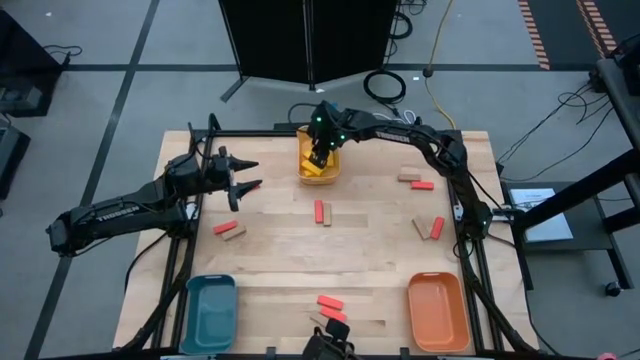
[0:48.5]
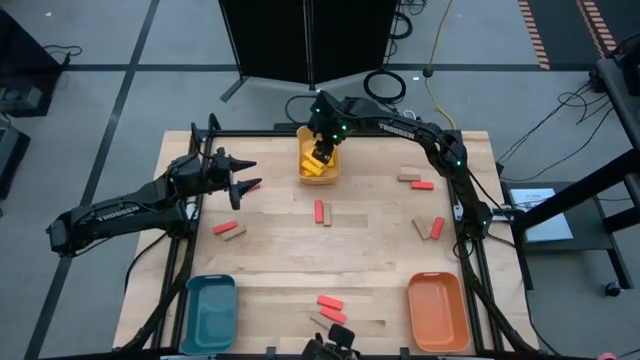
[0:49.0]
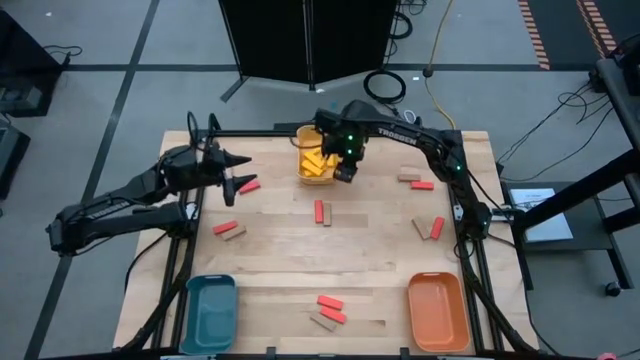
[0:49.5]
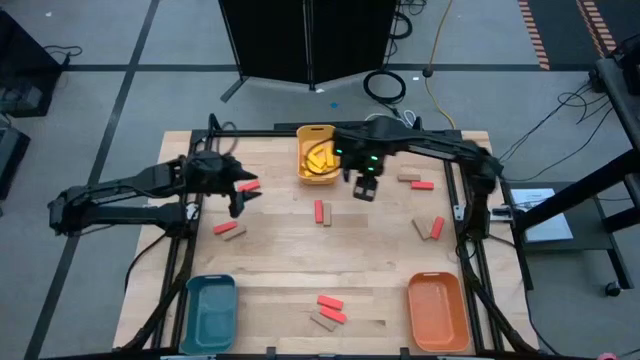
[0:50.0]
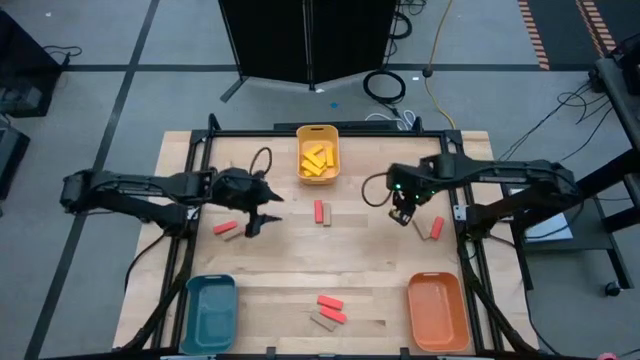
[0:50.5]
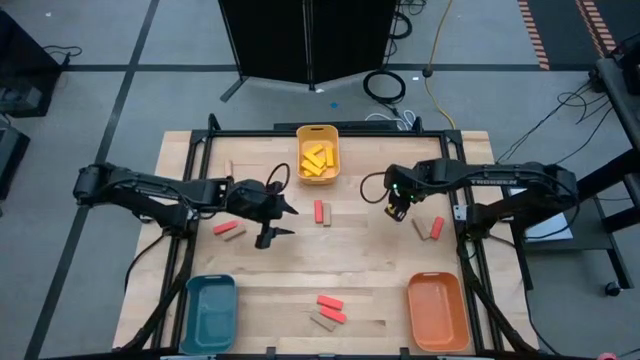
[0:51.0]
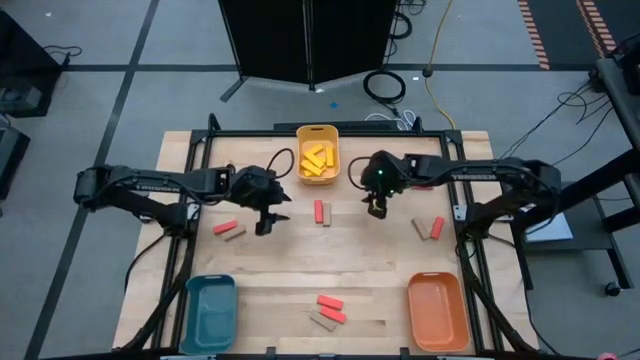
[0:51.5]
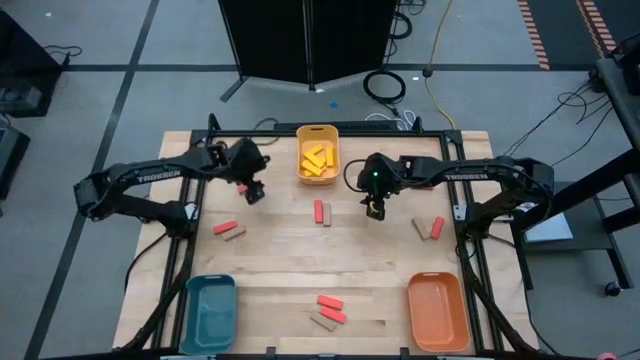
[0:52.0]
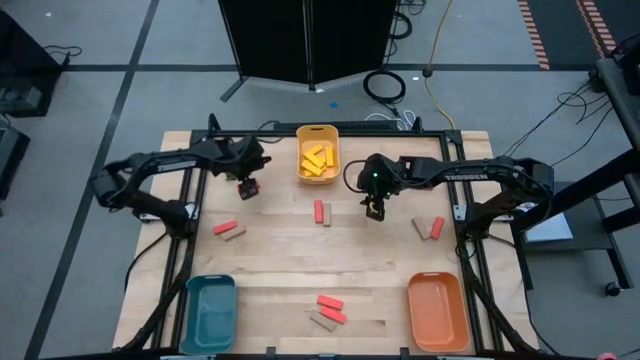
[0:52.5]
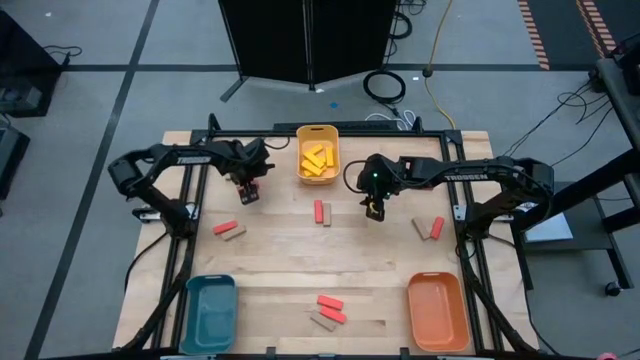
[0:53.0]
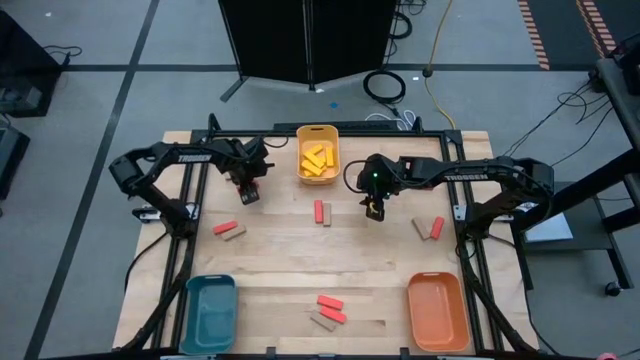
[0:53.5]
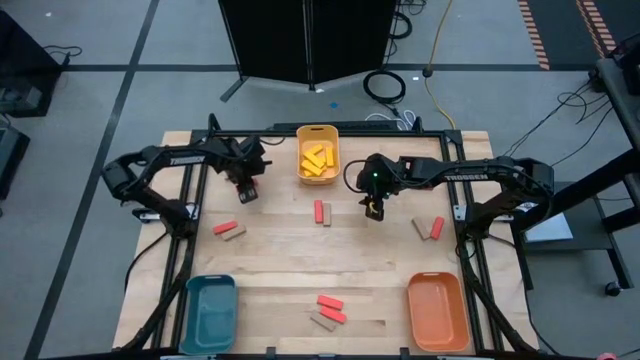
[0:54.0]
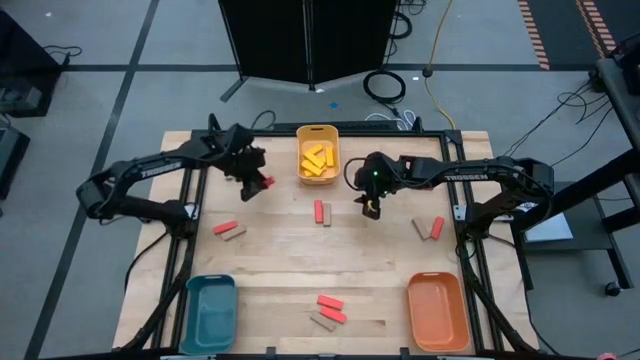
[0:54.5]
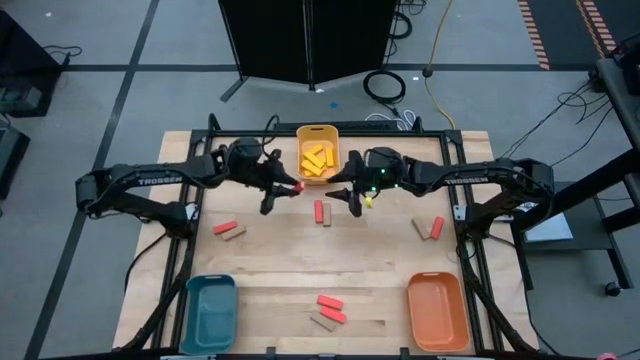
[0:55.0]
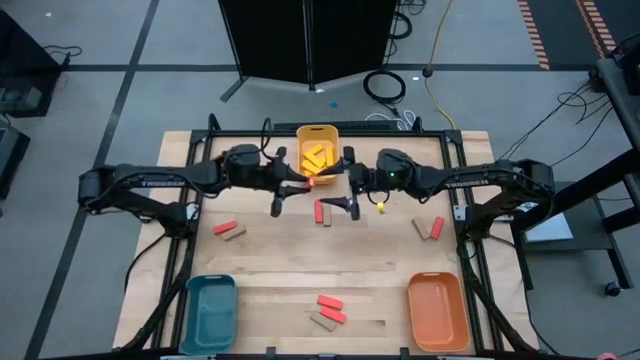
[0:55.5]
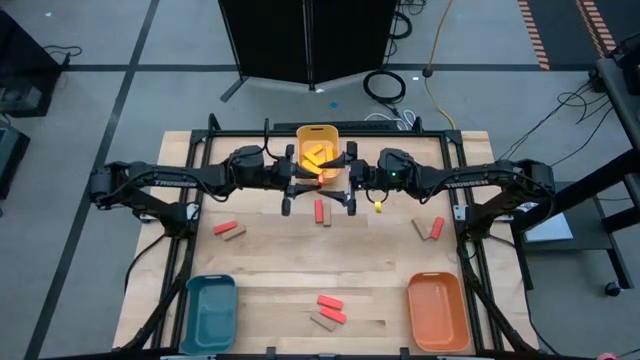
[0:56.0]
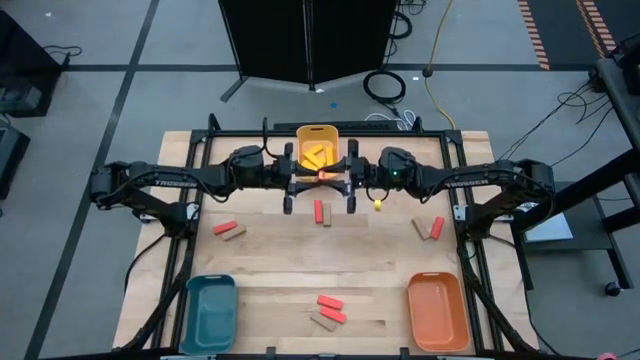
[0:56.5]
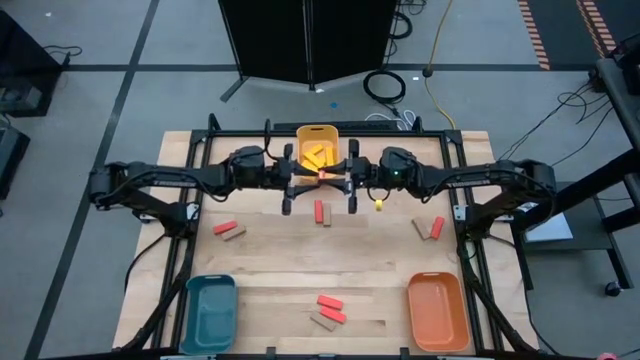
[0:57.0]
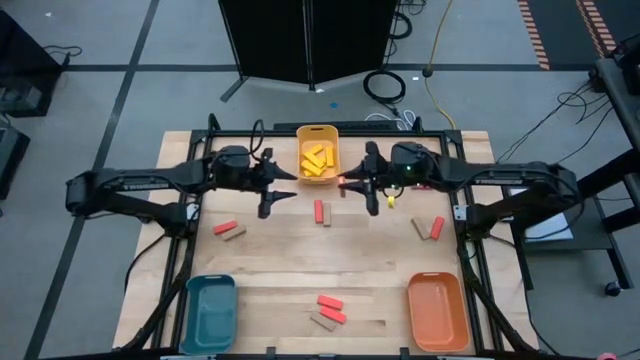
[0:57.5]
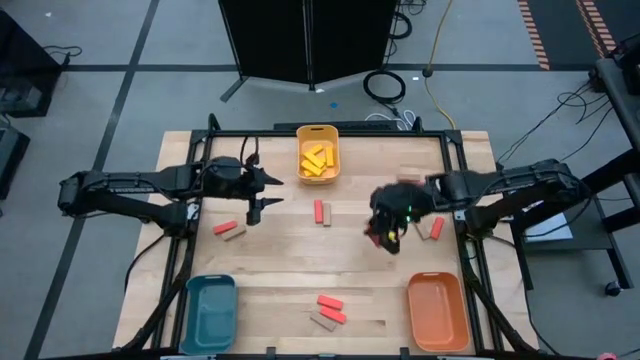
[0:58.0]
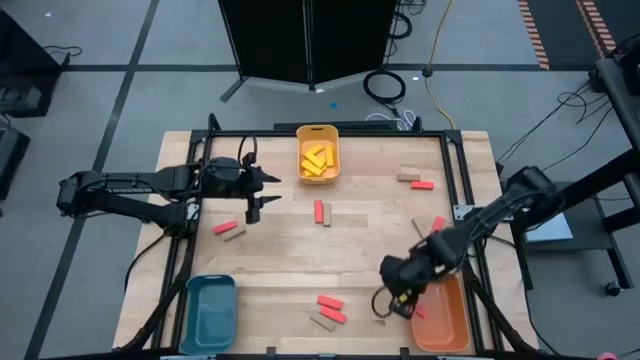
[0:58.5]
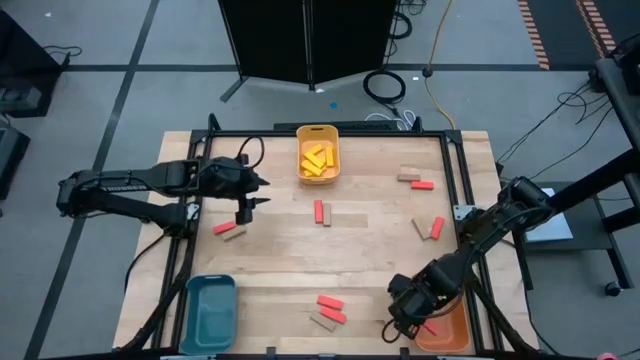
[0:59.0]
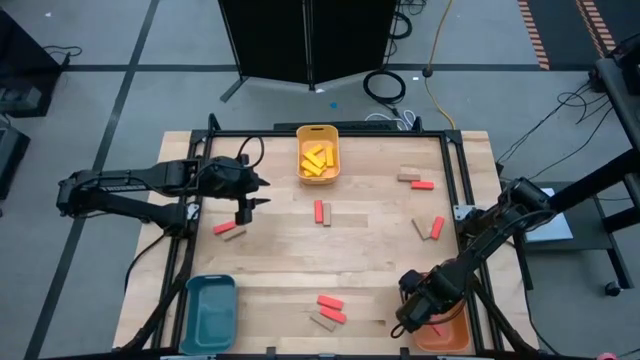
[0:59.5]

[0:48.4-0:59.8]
Task: Sort blocks
Put the orange block into the orange bin

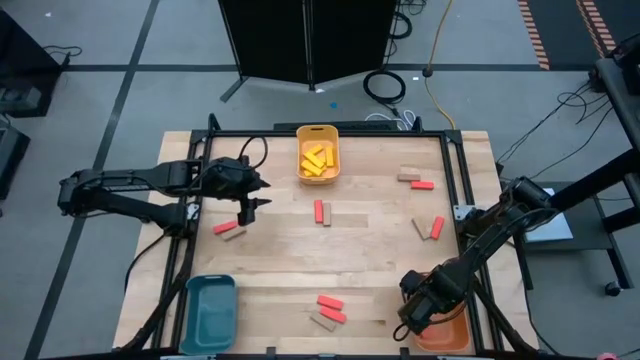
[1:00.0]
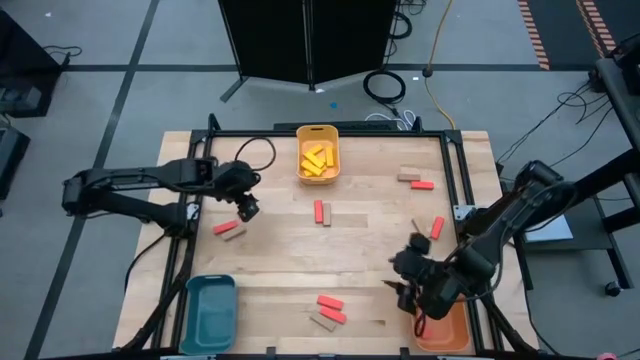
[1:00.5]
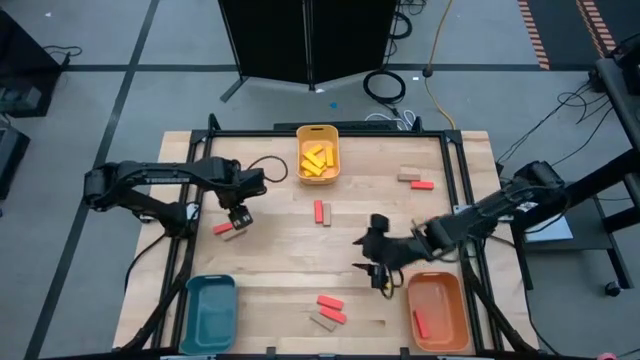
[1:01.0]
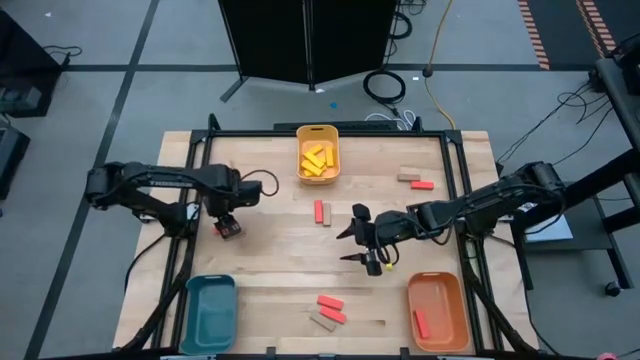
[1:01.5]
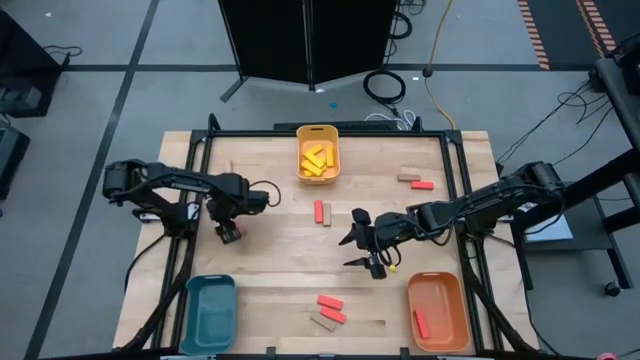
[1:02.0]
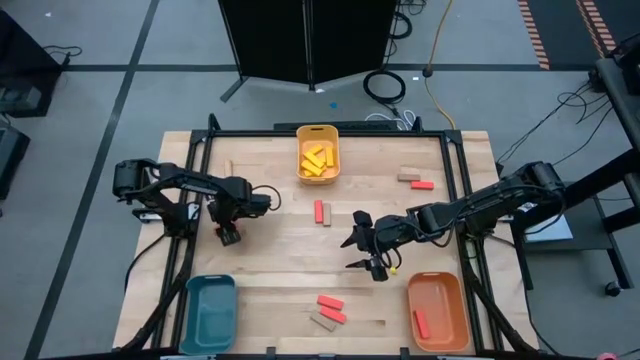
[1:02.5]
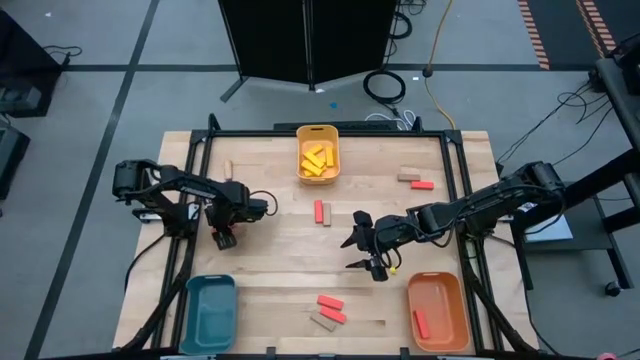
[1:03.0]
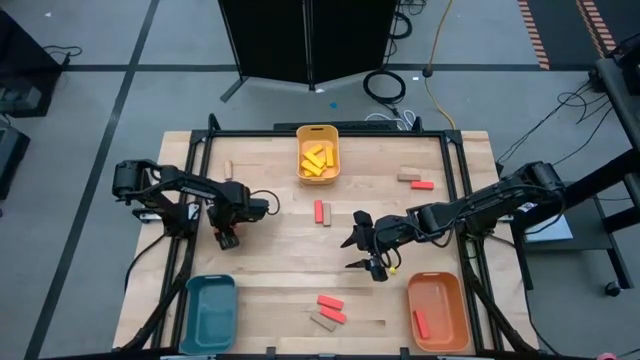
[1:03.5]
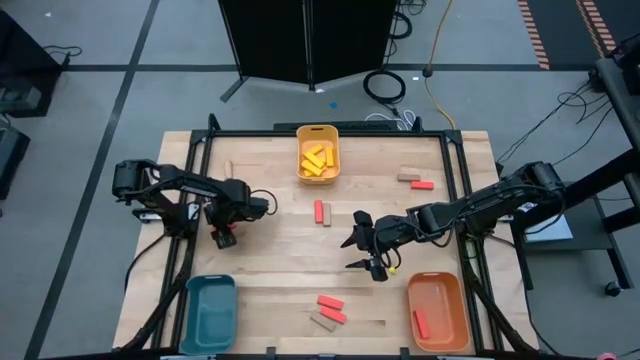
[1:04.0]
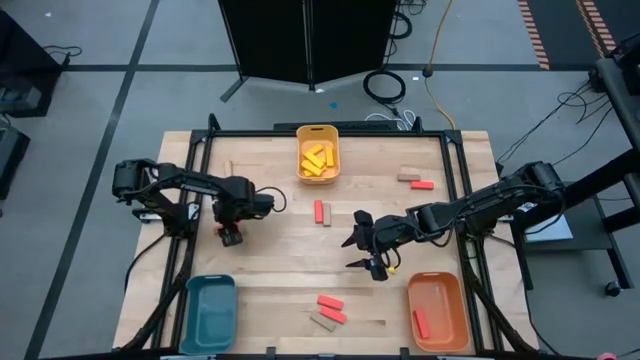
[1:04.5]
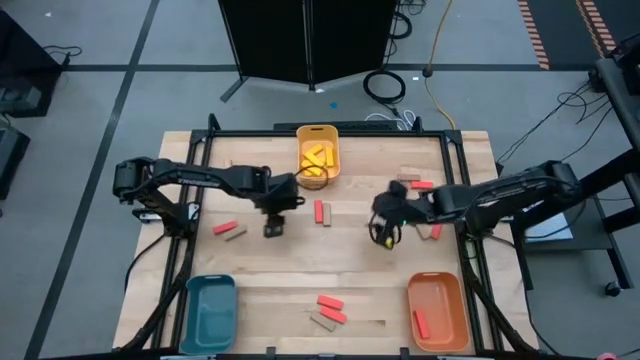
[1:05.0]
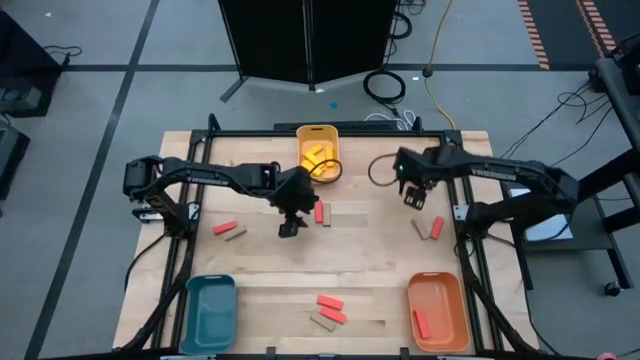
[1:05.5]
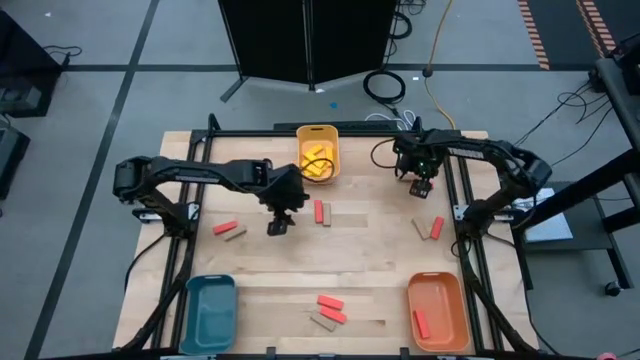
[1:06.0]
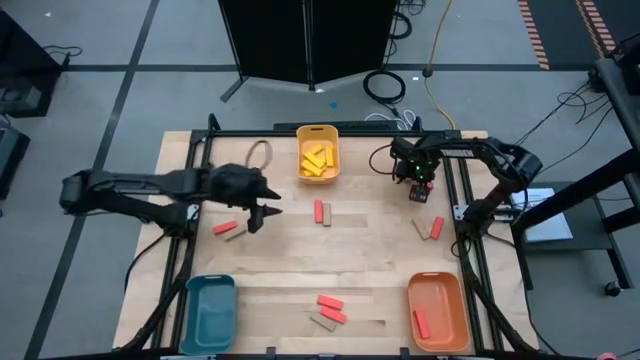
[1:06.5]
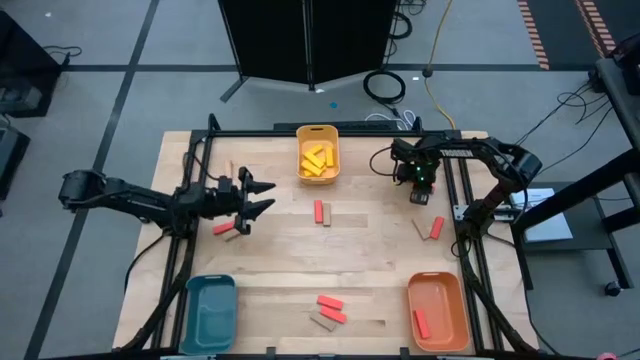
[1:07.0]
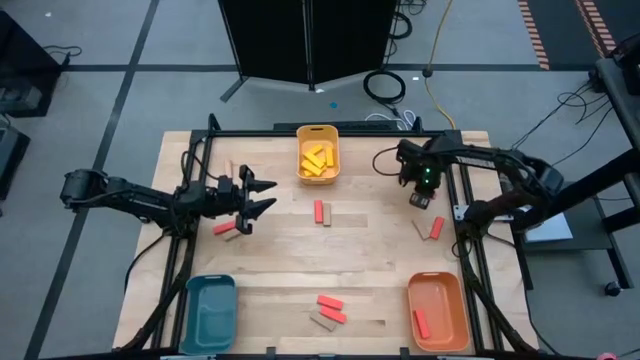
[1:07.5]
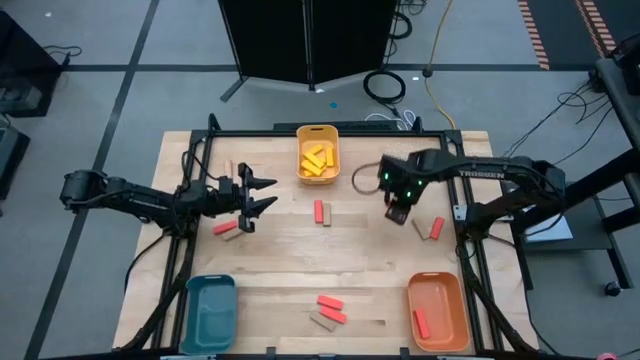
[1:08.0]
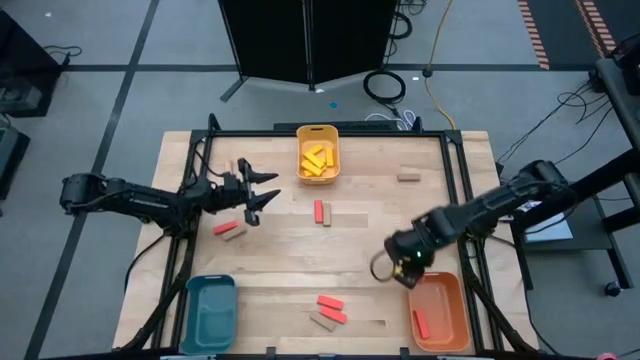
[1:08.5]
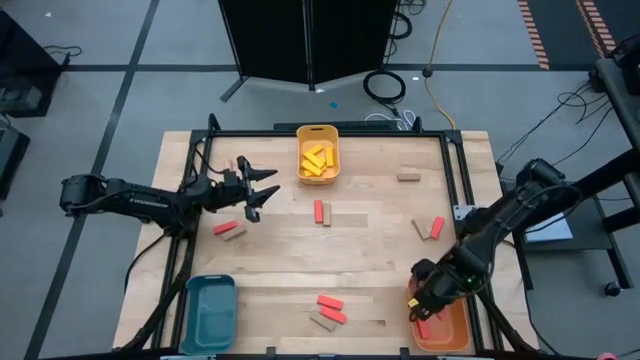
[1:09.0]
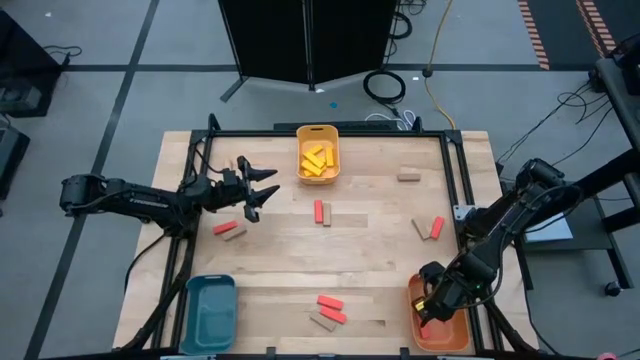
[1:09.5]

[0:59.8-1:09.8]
Put the orange block into the orange bin
